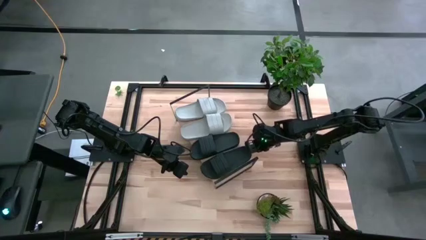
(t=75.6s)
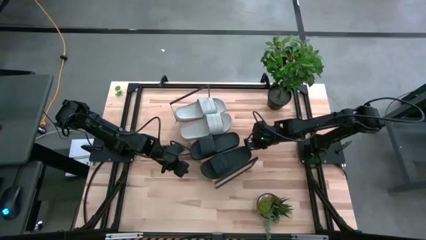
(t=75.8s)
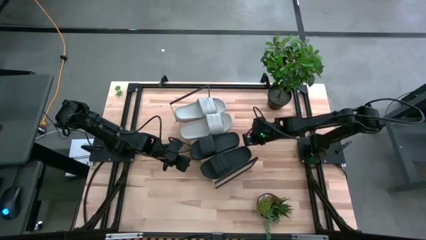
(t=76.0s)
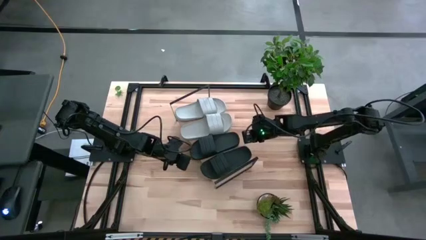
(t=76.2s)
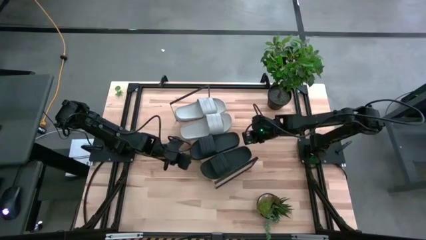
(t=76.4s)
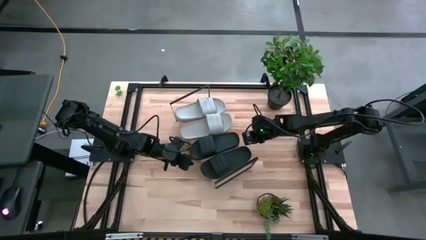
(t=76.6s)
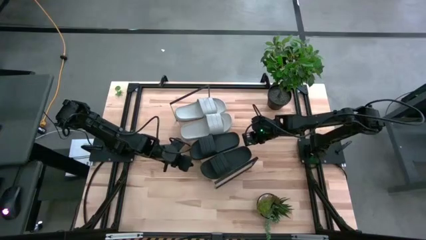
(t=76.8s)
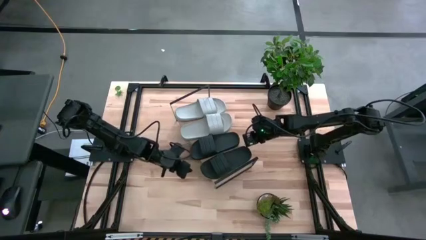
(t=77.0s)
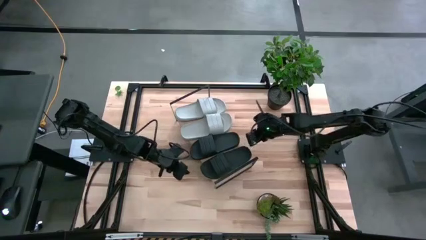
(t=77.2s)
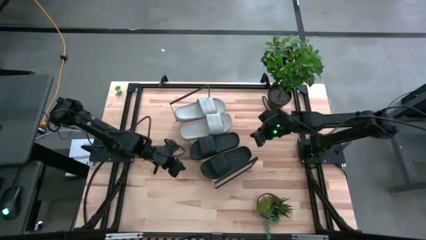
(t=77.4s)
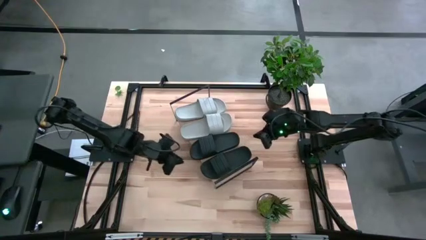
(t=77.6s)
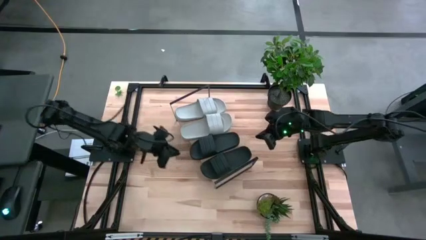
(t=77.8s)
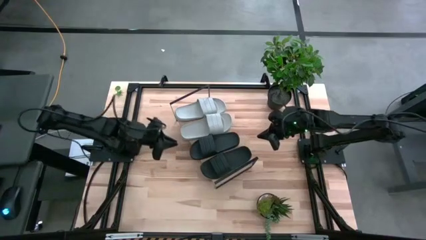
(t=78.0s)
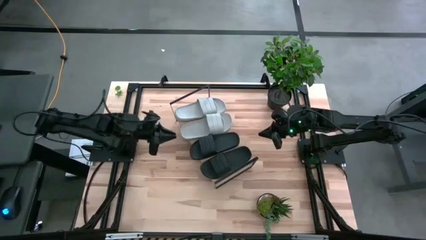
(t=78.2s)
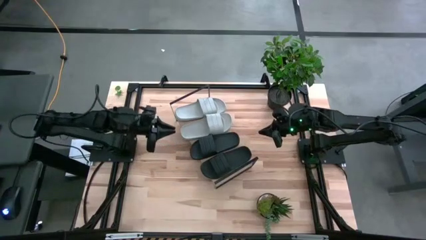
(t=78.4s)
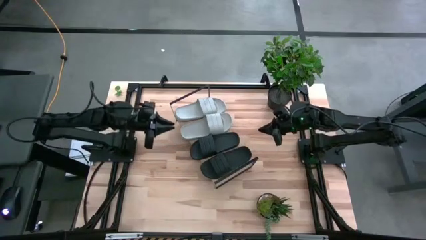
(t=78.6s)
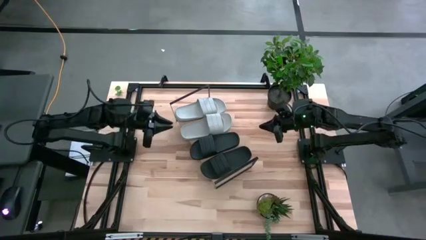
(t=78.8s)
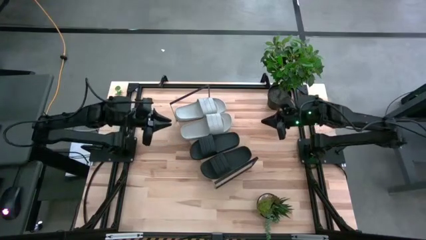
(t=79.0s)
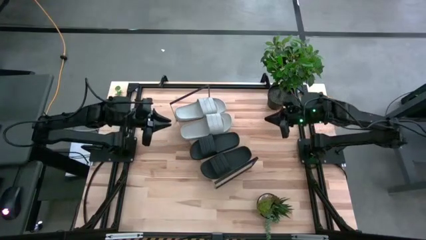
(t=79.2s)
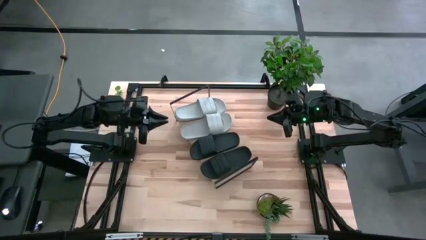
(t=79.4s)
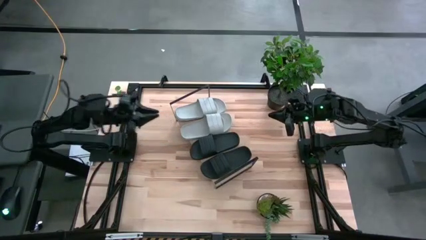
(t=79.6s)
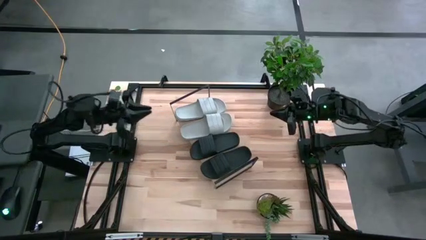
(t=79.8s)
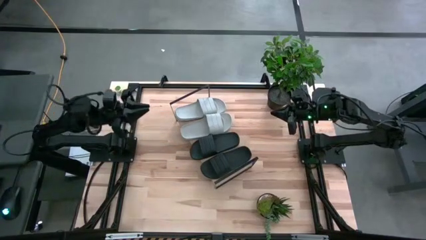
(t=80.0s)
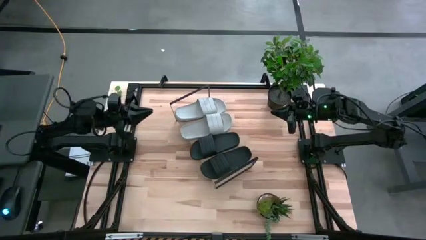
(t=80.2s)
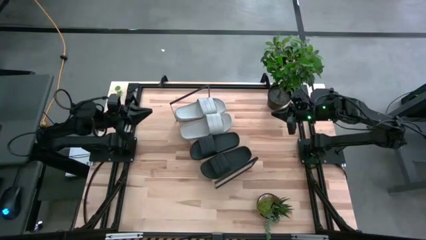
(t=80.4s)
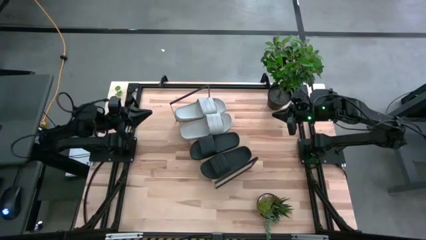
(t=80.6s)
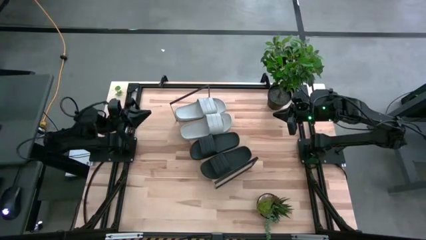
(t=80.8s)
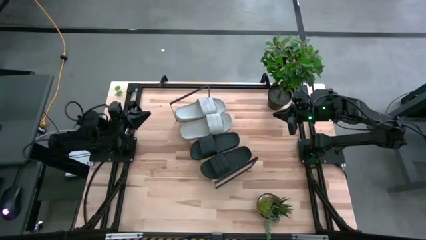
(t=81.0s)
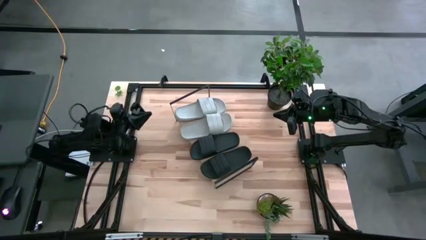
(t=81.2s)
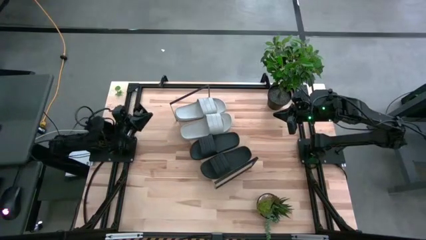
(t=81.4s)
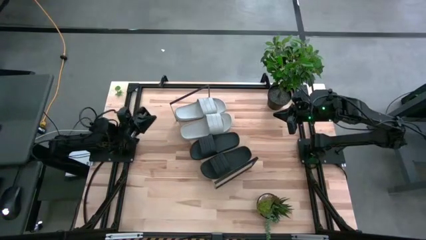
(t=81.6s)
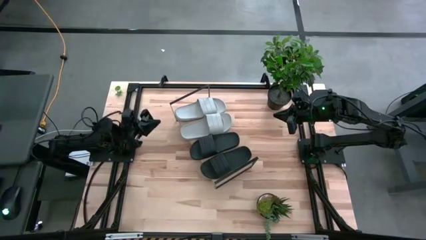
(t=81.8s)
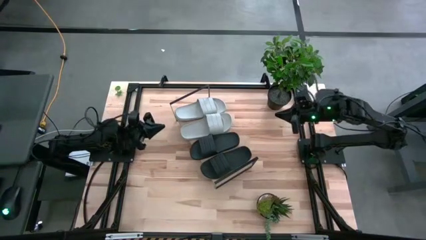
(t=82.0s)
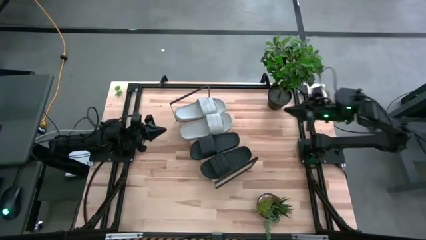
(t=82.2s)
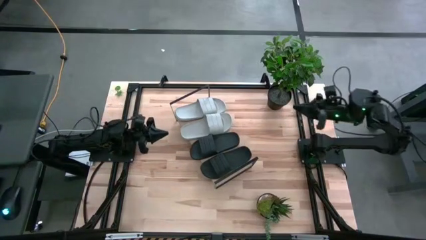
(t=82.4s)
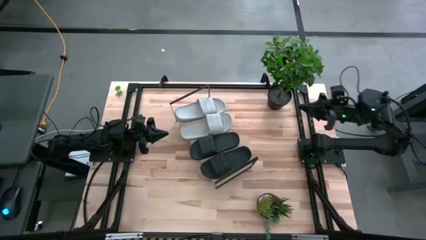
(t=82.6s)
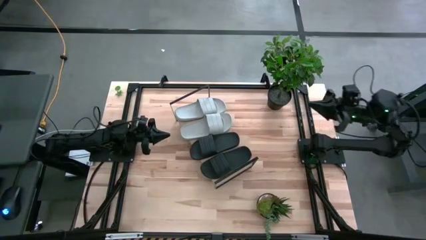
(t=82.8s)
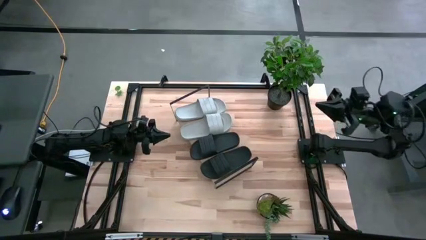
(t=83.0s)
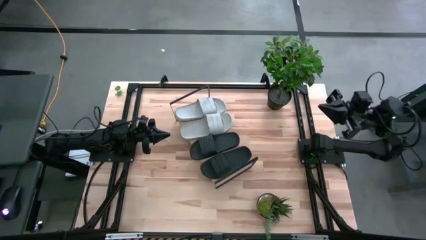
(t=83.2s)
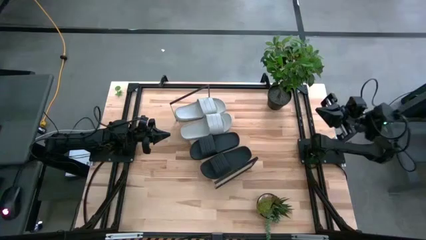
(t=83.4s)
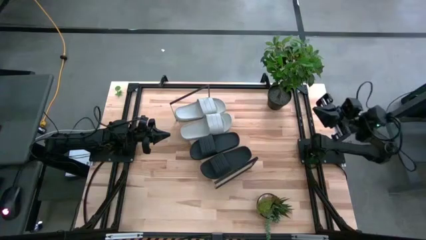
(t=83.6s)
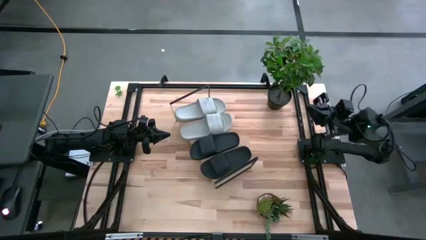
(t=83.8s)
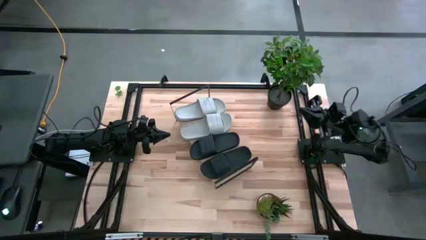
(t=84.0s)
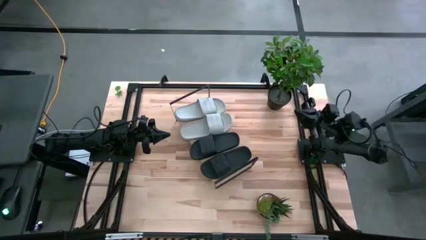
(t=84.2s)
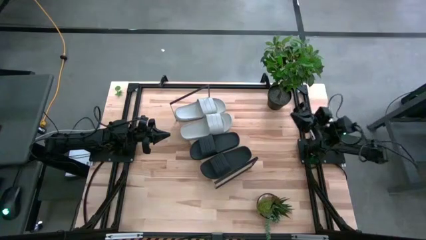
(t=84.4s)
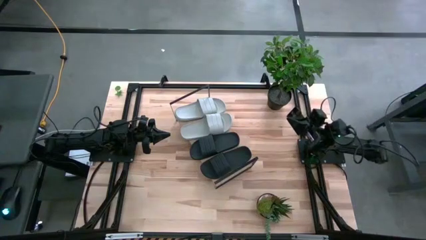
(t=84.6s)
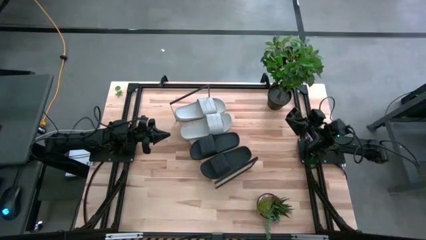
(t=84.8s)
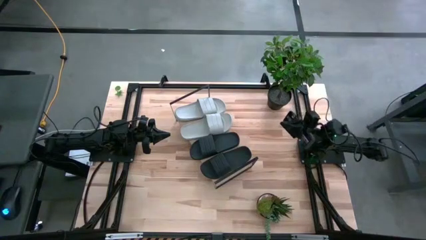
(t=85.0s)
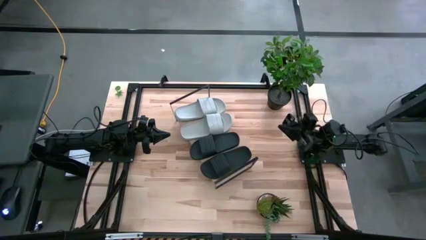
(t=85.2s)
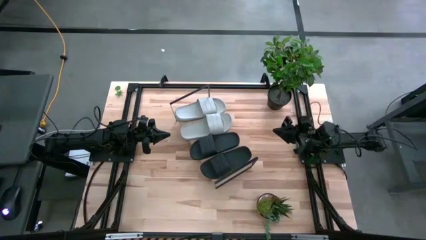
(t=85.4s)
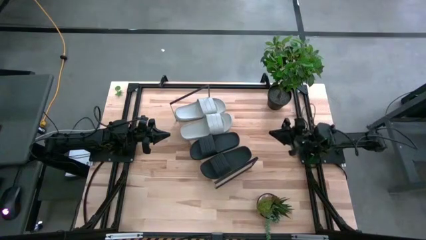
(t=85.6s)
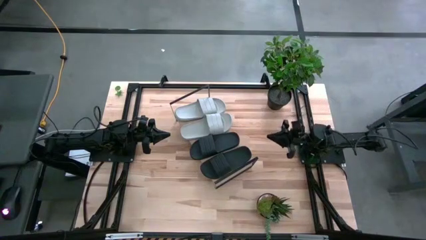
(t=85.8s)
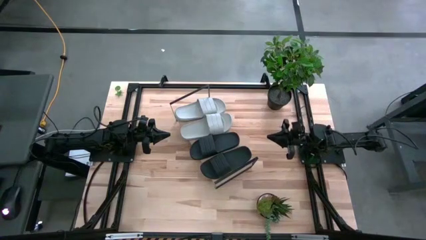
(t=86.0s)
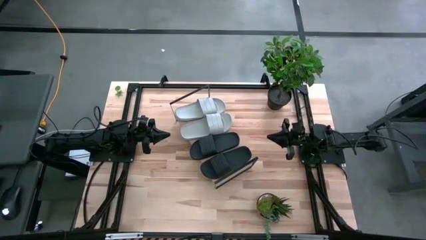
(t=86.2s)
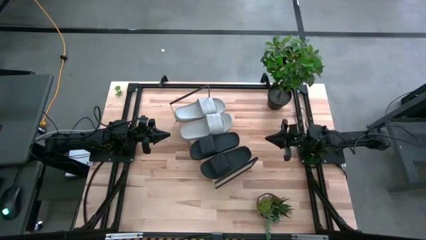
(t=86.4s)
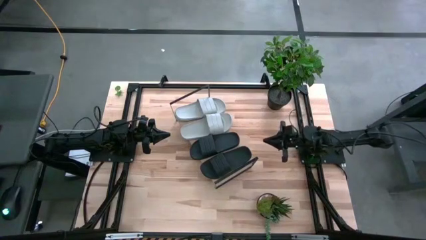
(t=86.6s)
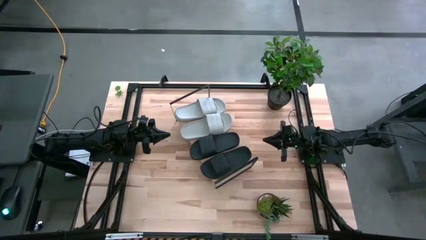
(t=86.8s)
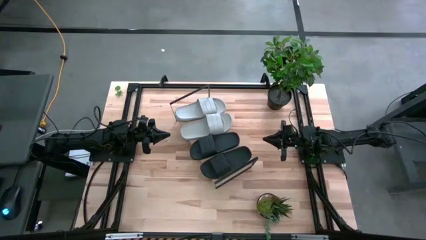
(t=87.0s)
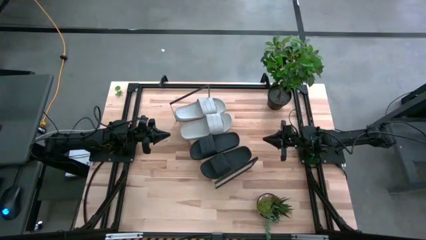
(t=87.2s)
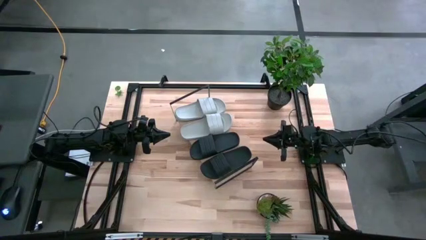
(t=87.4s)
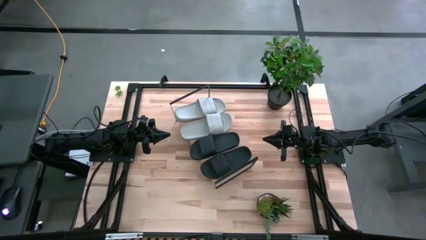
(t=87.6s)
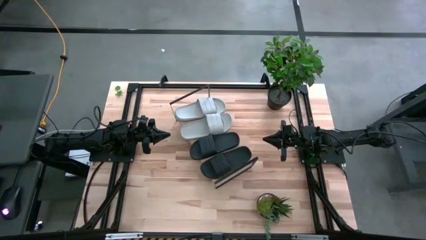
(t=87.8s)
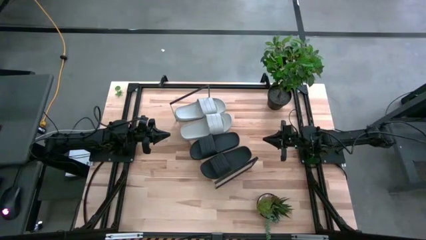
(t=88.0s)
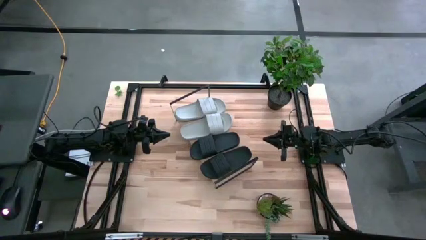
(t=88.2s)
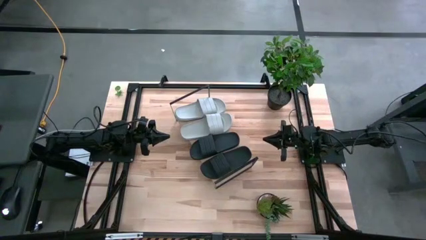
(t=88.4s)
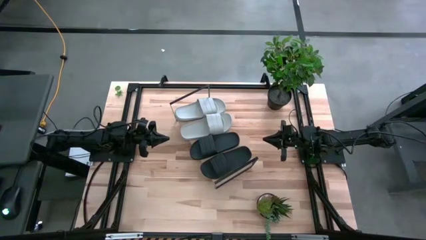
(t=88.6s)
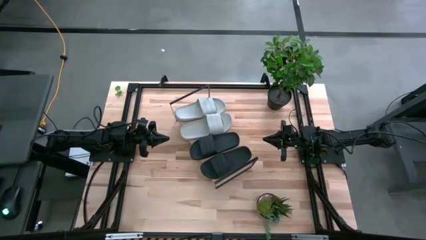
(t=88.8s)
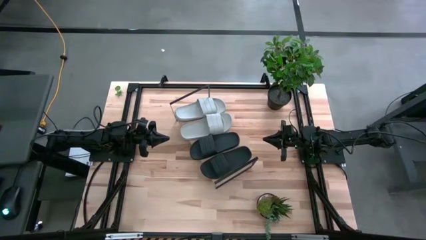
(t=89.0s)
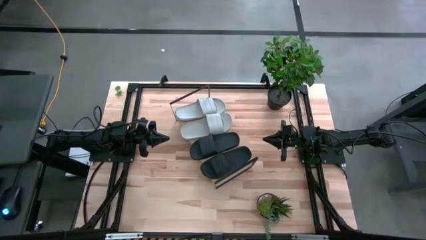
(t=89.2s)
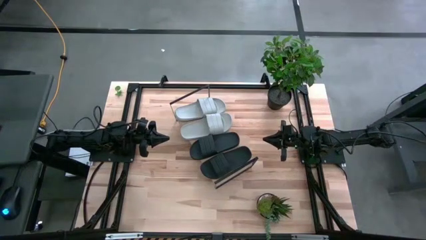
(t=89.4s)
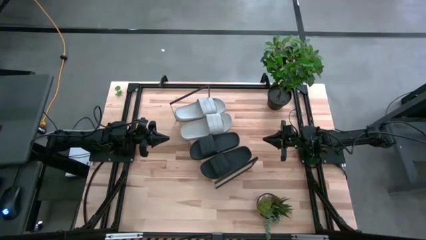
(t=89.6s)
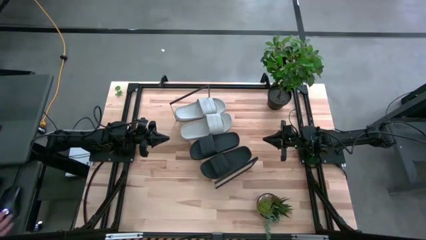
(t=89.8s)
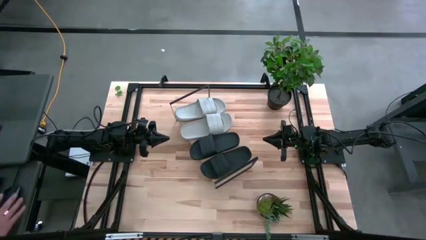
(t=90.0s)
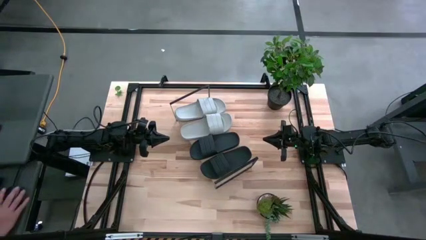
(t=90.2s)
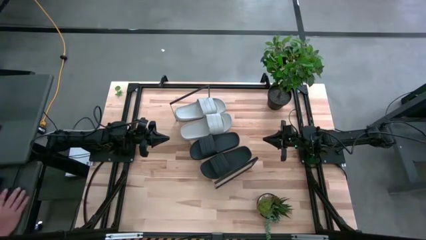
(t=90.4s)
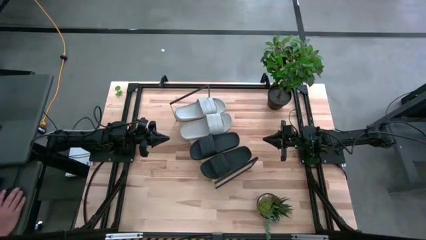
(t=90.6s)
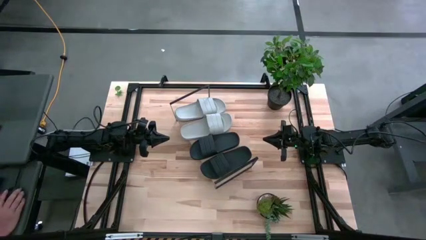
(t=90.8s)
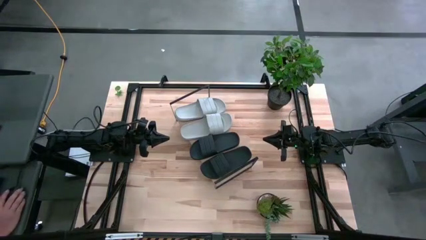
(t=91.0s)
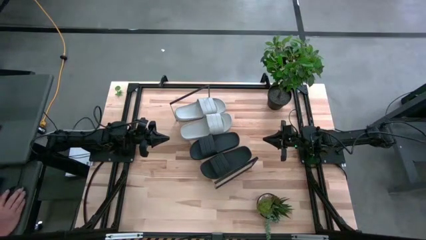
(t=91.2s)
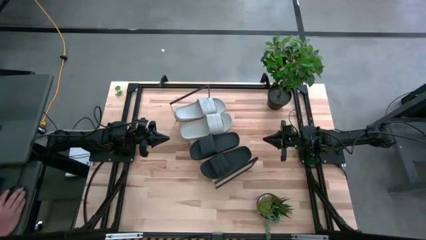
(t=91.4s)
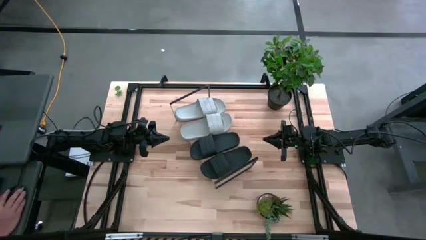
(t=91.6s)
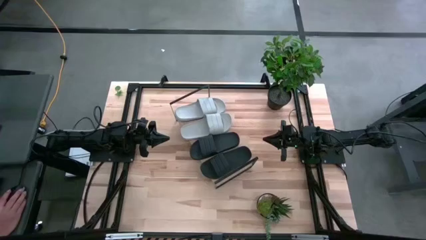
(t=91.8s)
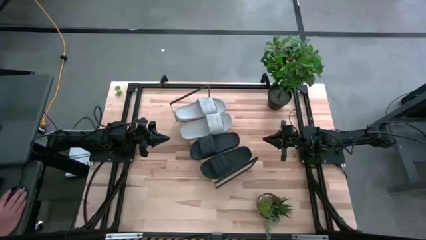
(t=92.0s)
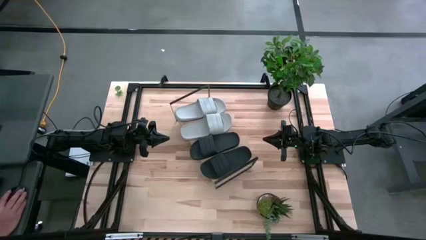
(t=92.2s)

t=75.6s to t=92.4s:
Task: Pick and place slides into the shelf
Return to Home Position
